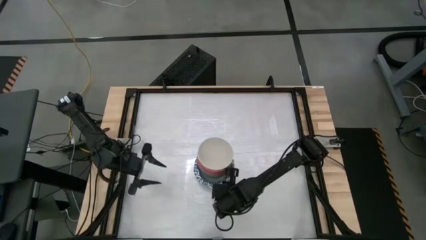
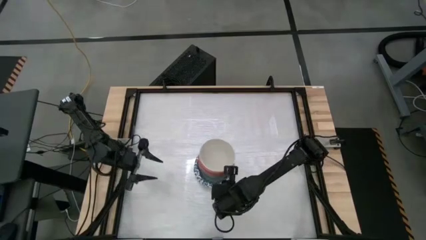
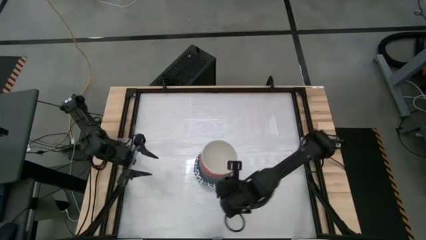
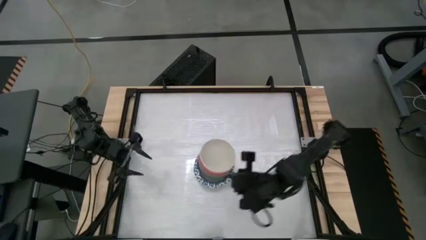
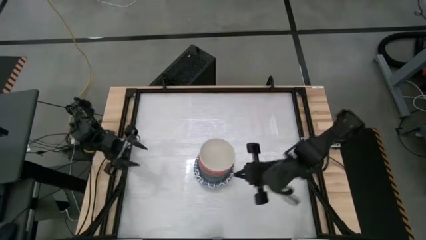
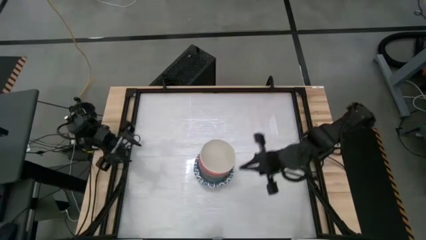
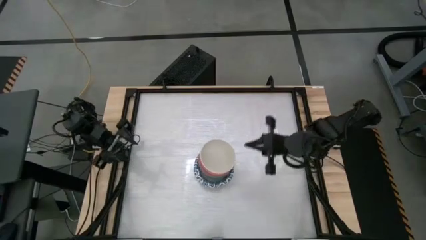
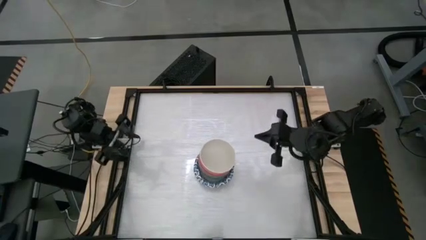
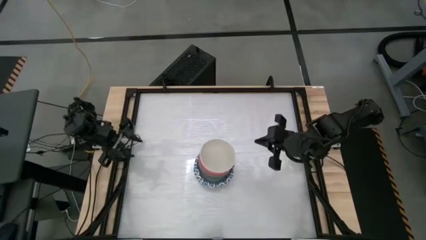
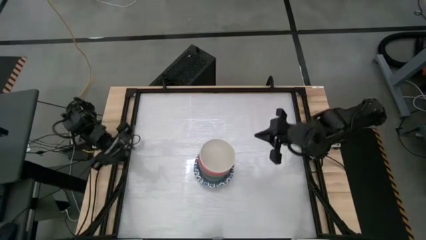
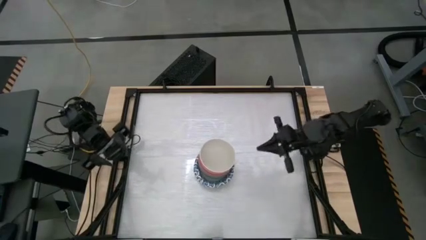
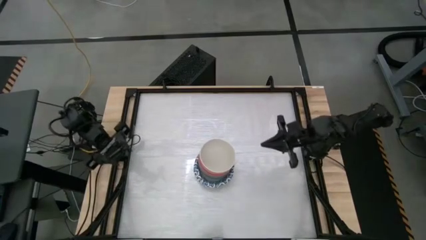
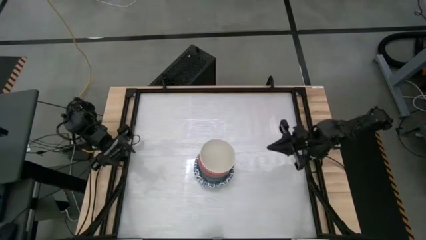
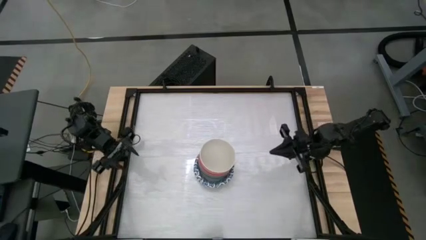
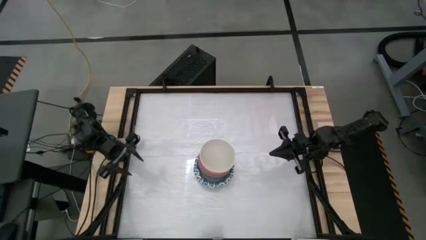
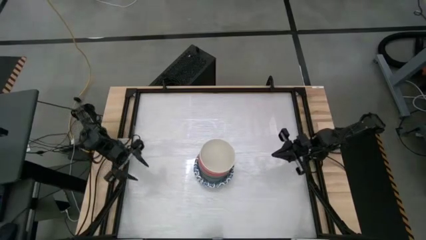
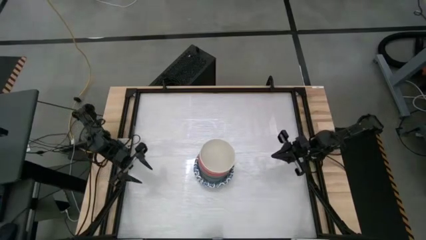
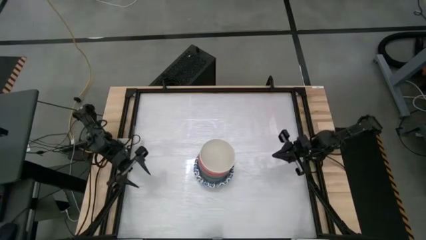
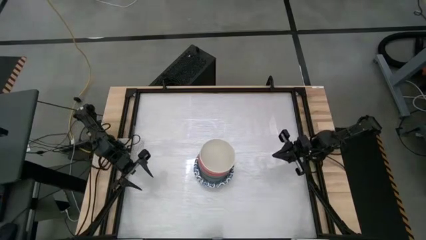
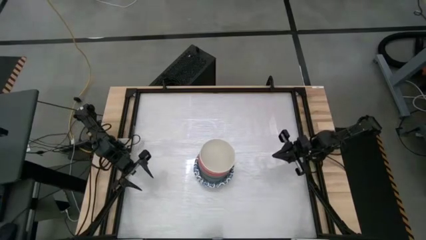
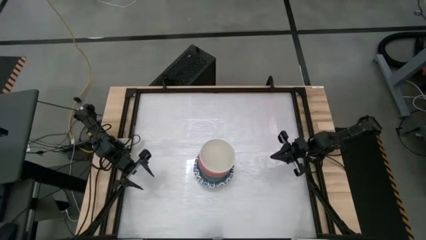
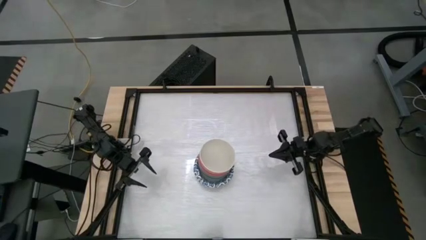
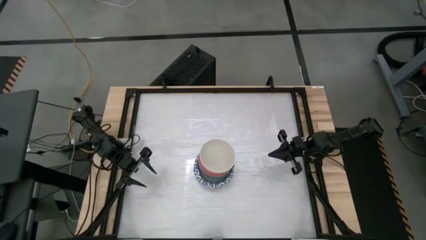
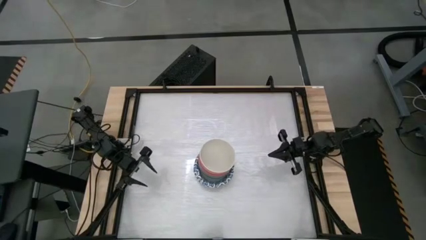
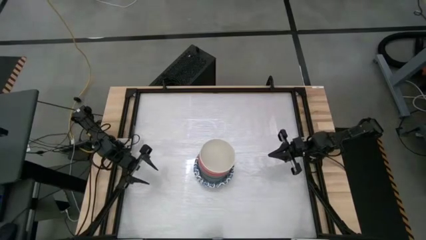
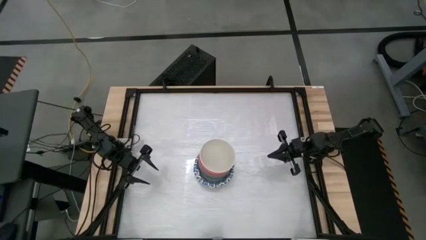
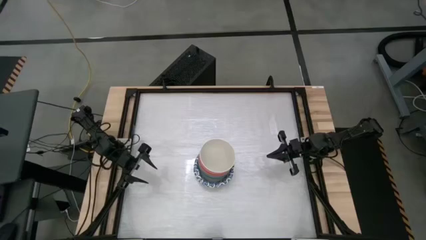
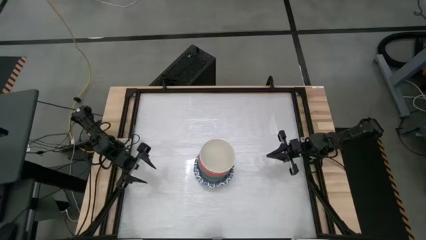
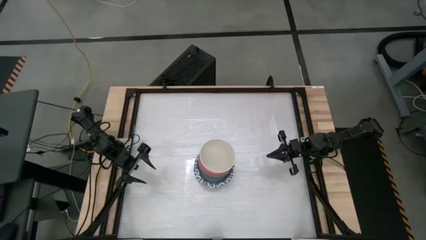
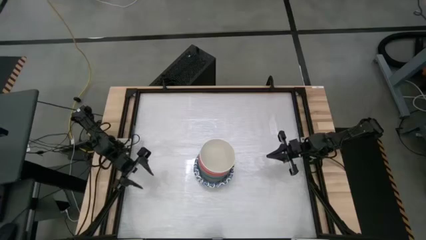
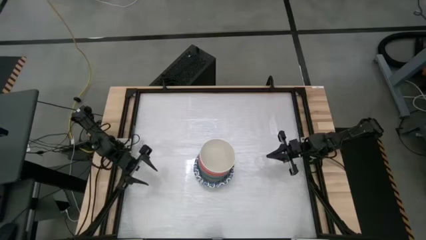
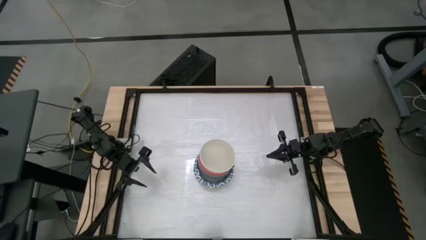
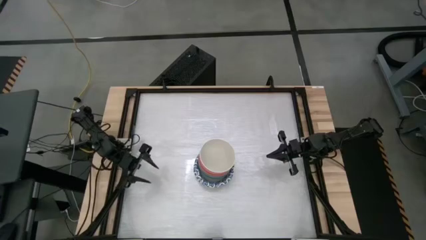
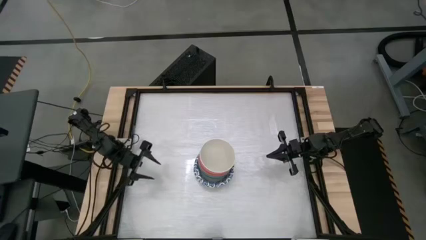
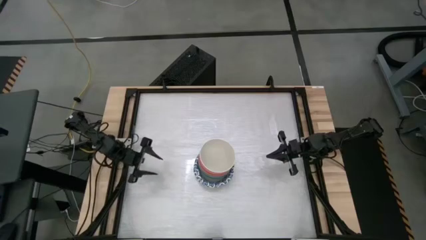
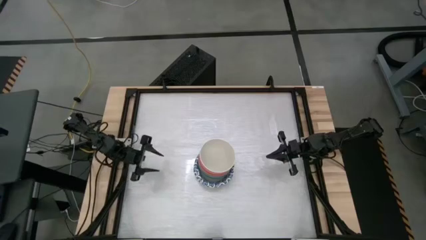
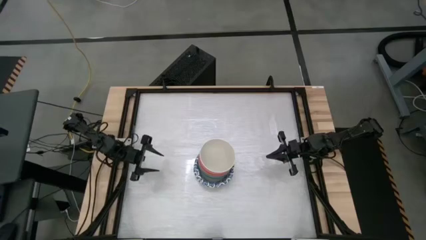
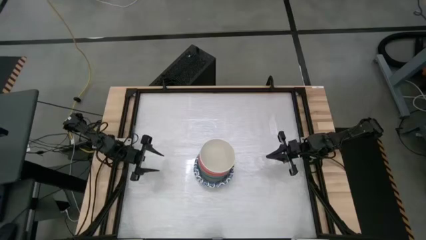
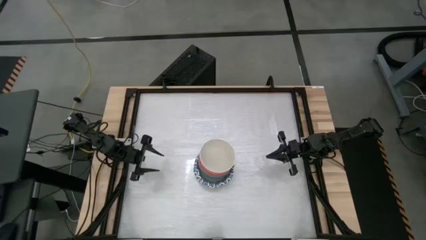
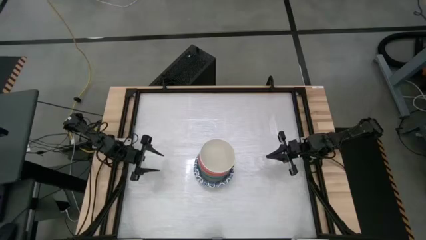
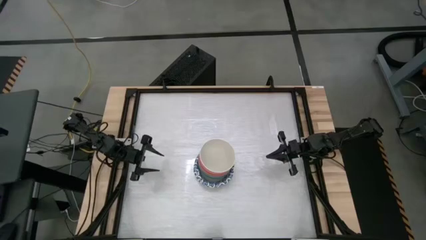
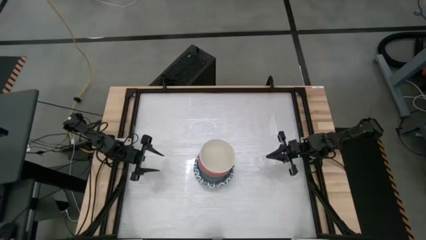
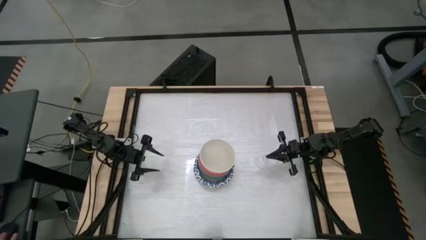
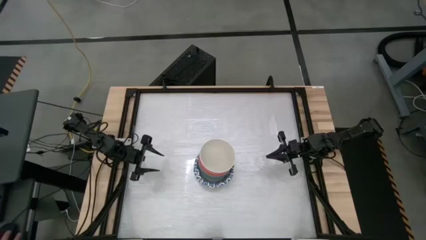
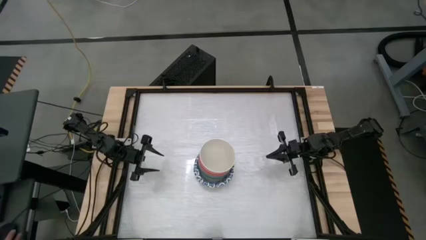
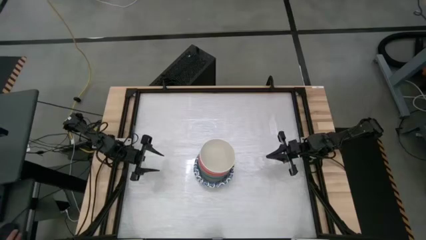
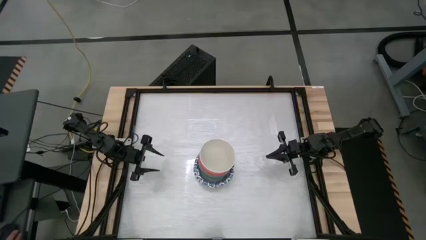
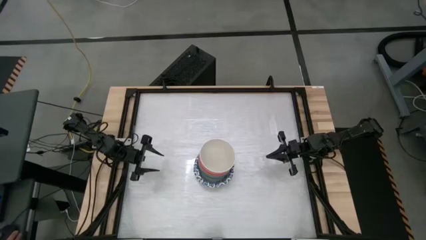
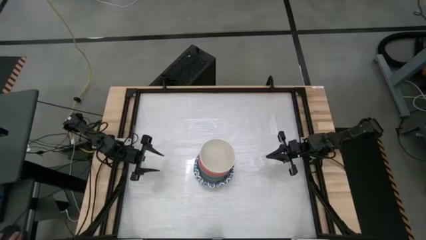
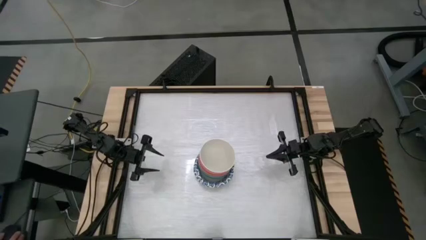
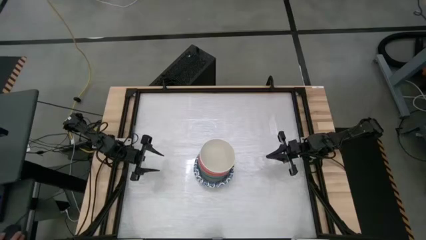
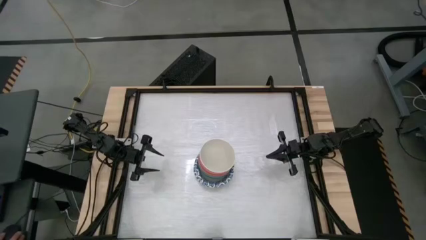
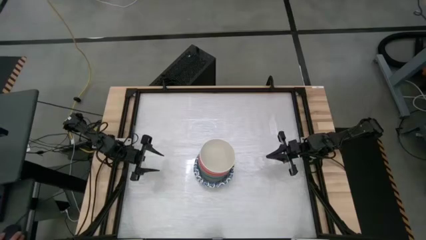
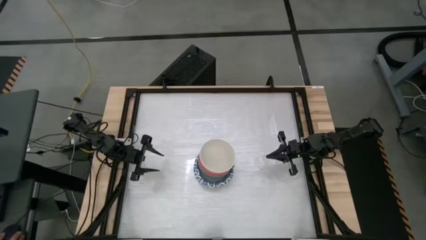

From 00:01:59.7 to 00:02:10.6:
Return To Home Position
